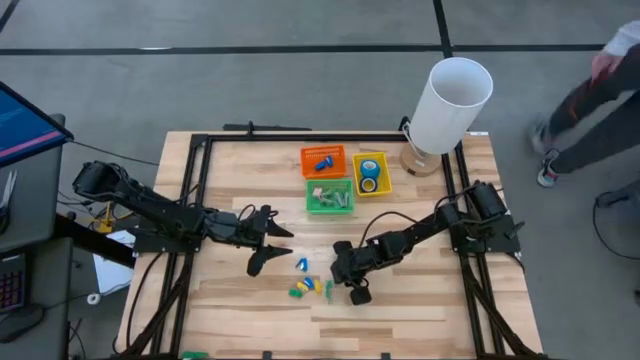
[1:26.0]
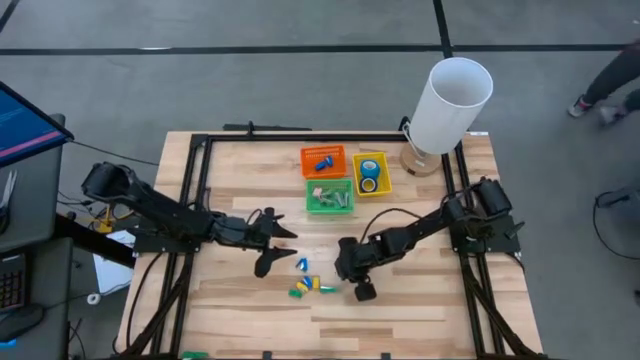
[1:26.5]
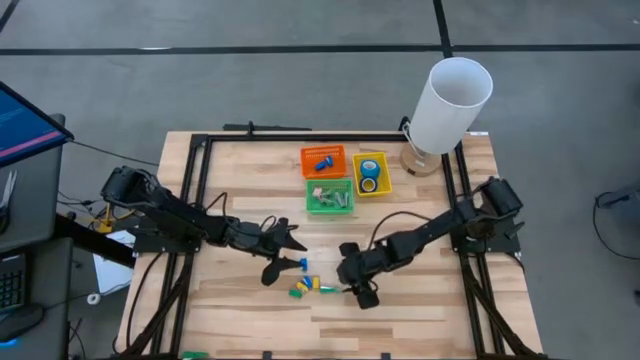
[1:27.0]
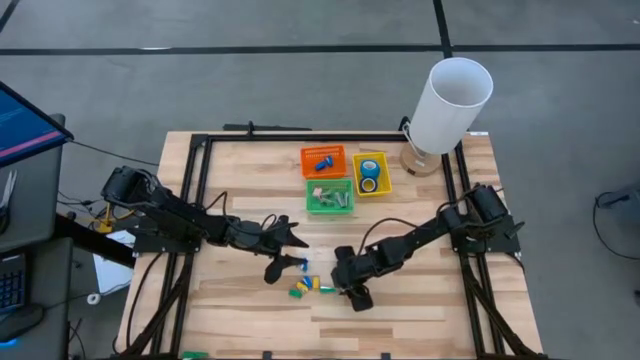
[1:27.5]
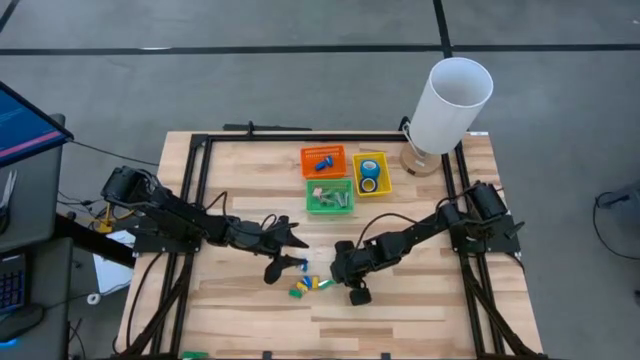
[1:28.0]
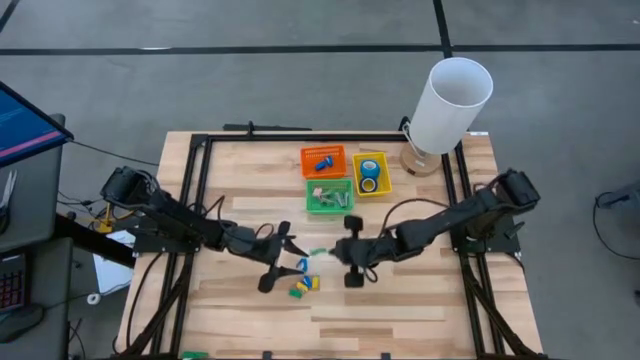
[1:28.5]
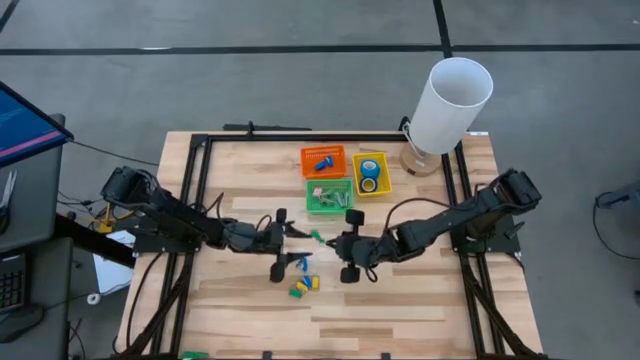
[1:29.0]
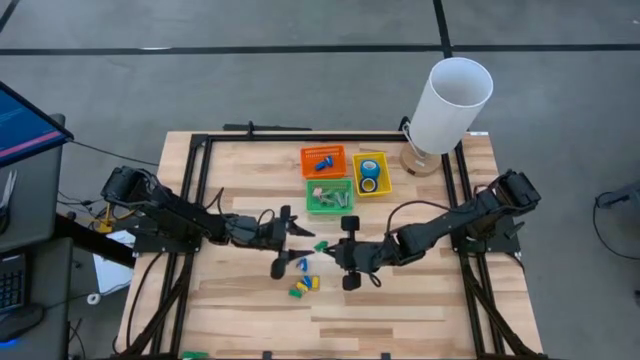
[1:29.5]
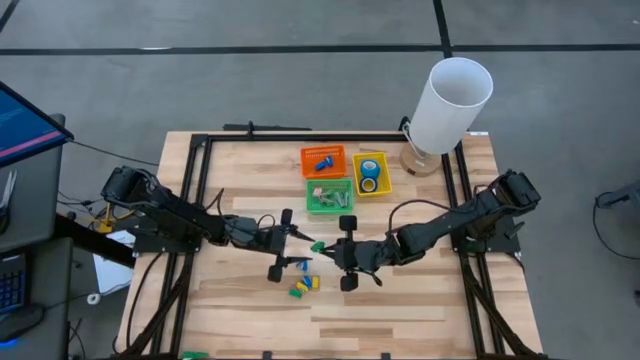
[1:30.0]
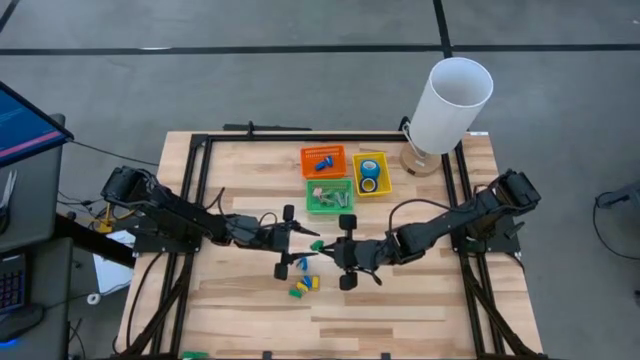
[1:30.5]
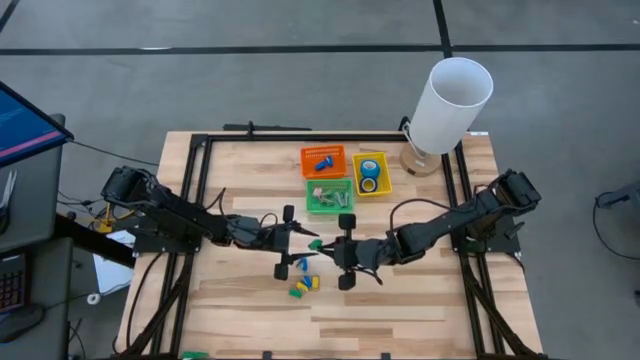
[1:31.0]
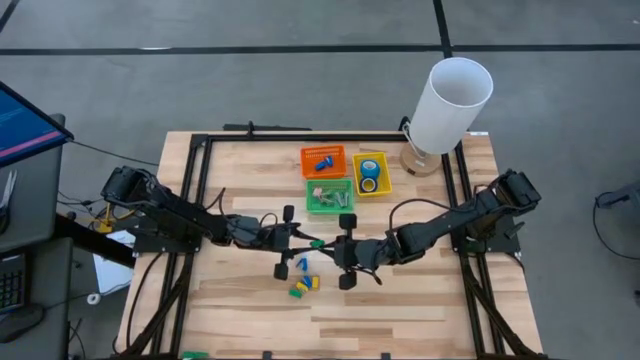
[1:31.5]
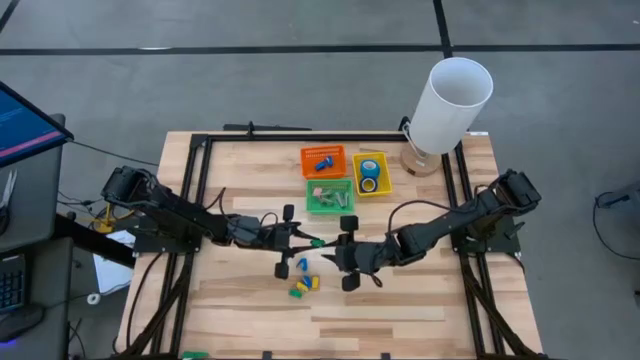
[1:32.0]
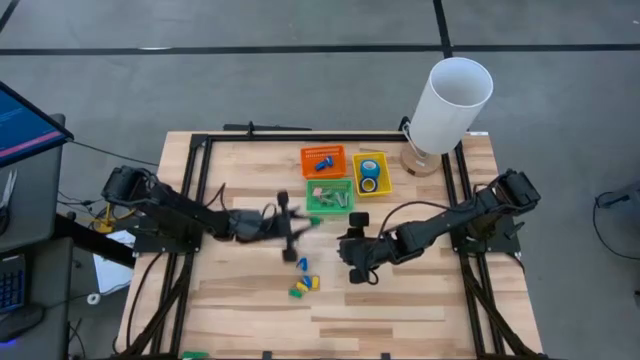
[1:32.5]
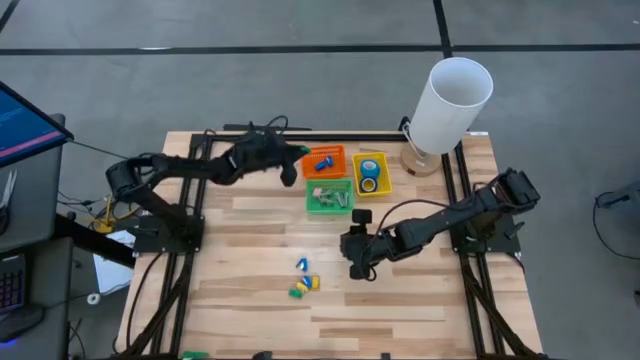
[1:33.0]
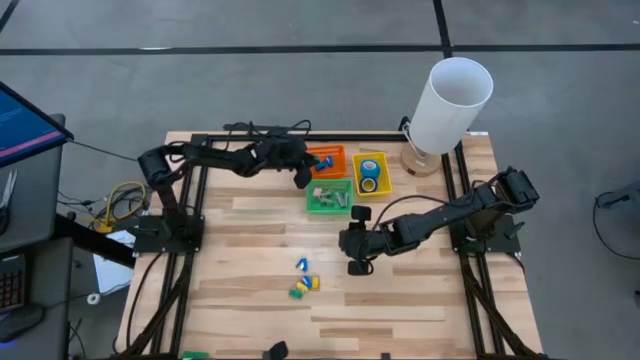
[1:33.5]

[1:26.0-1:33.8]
Task: Pick and place Stapler, Stapler remover, tape
Put the green stapler into the orange bin

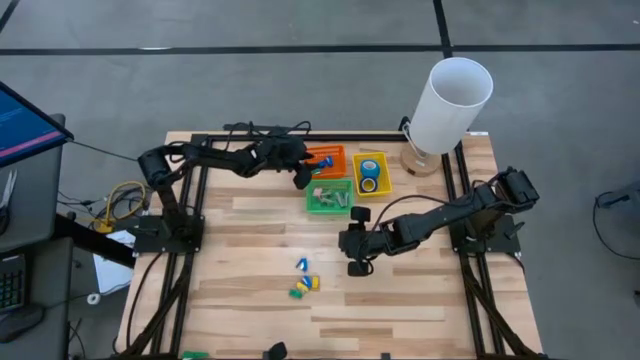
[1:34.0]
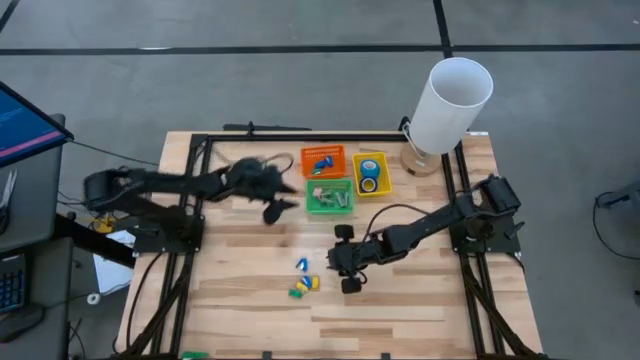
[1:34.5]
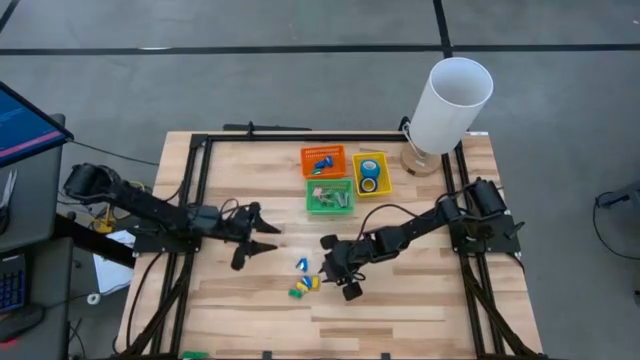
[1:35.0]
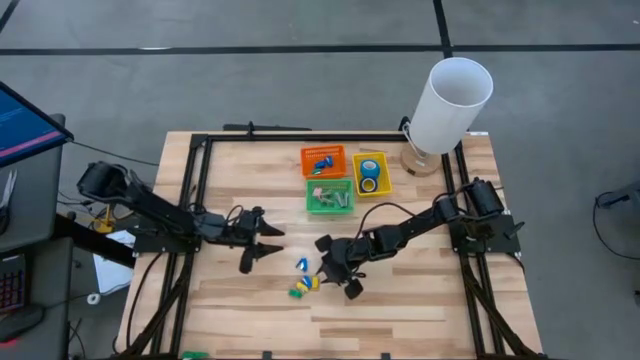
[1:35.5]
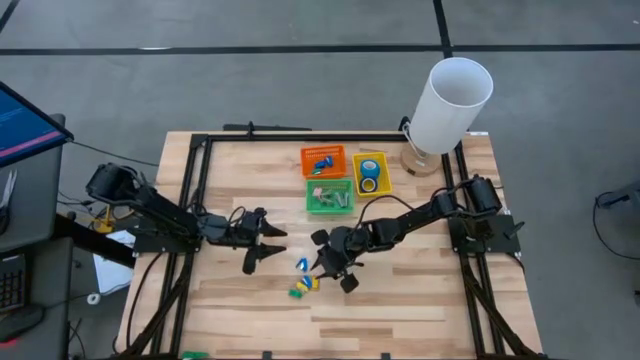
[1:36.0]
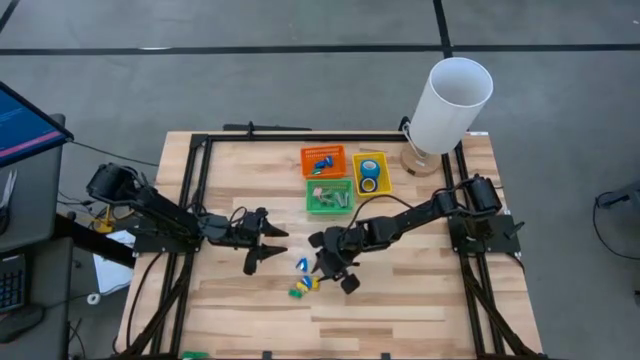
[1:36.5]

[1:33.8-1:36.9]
Put the yellow stapler into the orange bin

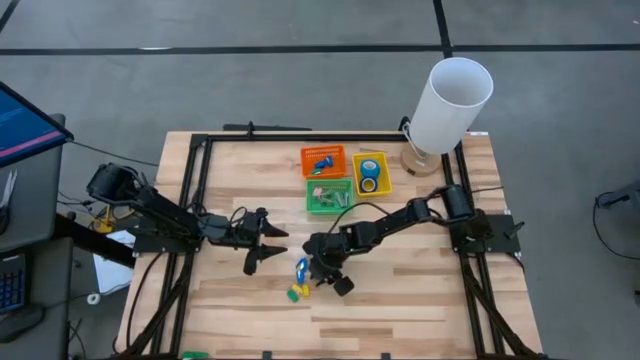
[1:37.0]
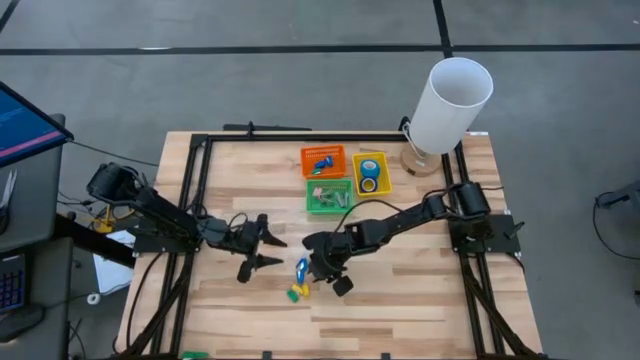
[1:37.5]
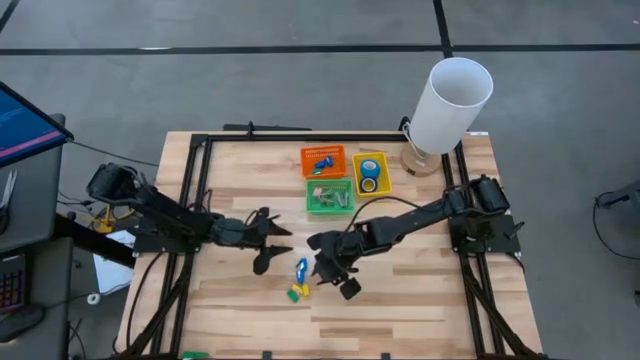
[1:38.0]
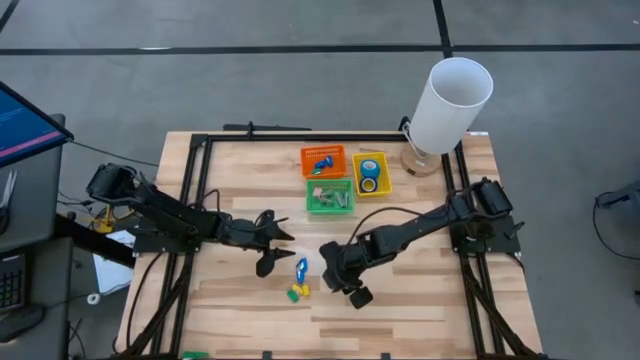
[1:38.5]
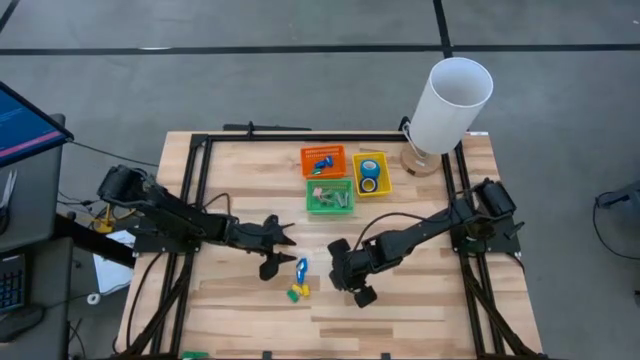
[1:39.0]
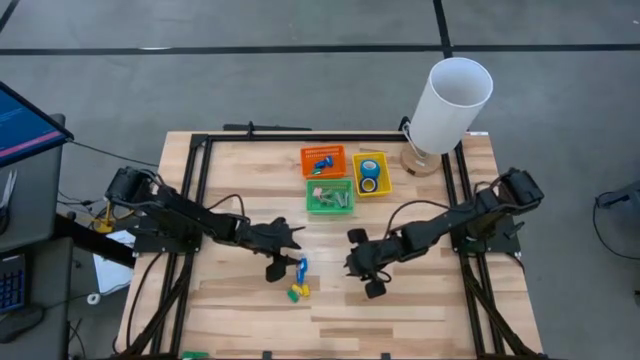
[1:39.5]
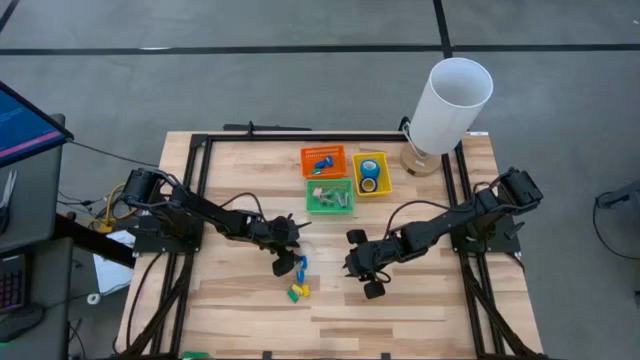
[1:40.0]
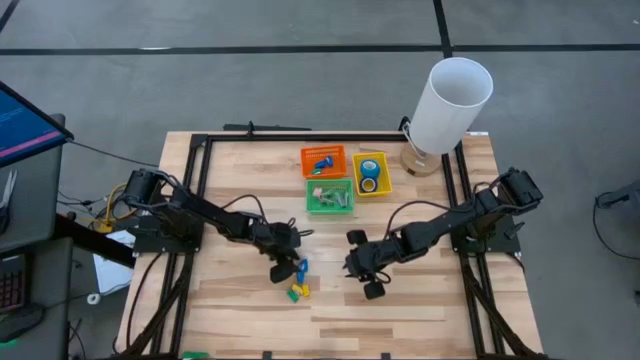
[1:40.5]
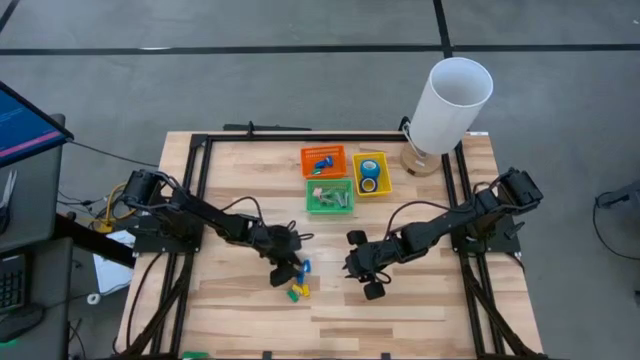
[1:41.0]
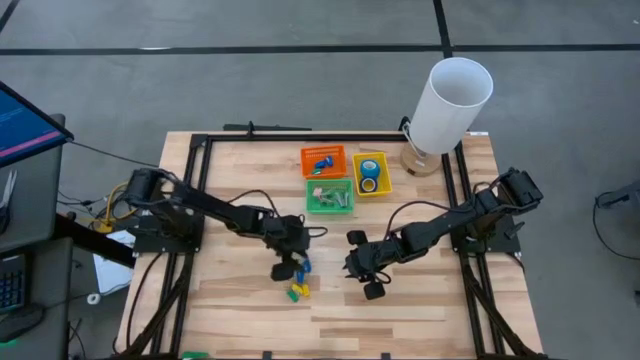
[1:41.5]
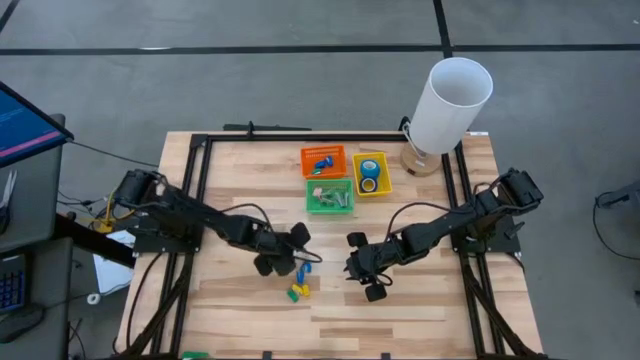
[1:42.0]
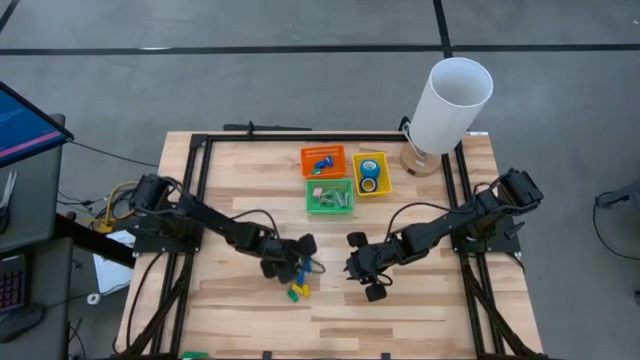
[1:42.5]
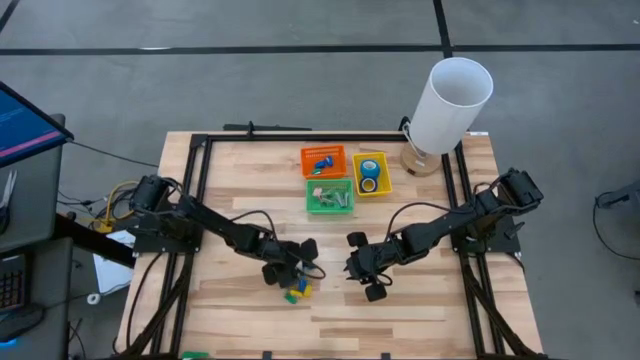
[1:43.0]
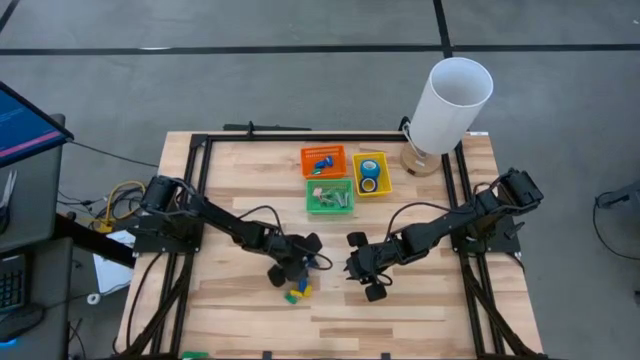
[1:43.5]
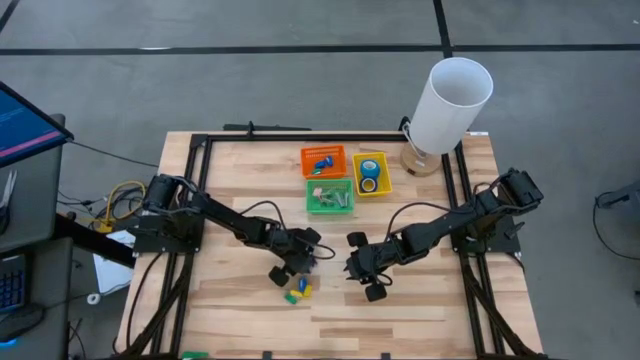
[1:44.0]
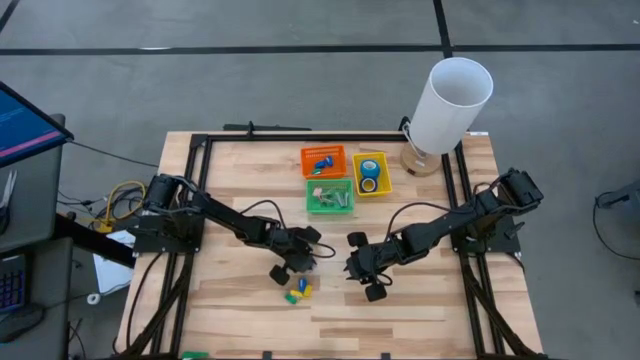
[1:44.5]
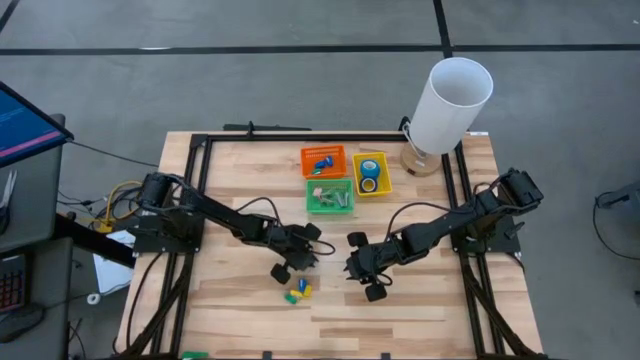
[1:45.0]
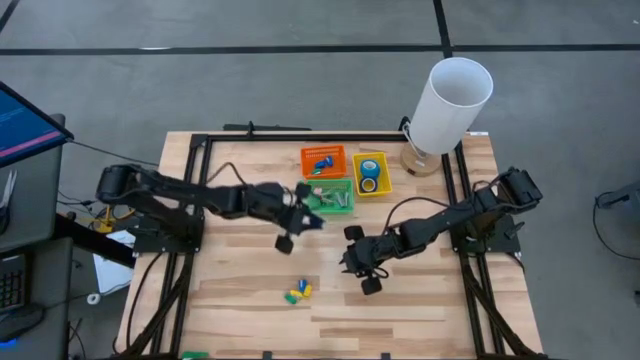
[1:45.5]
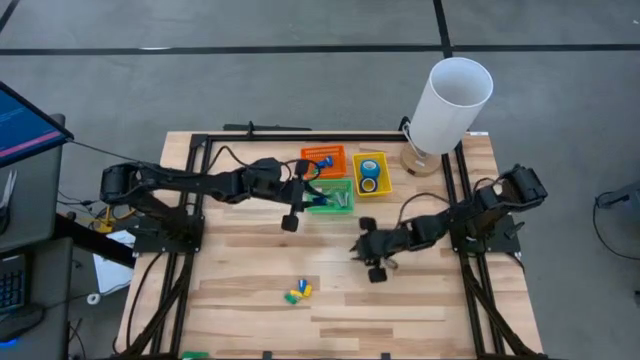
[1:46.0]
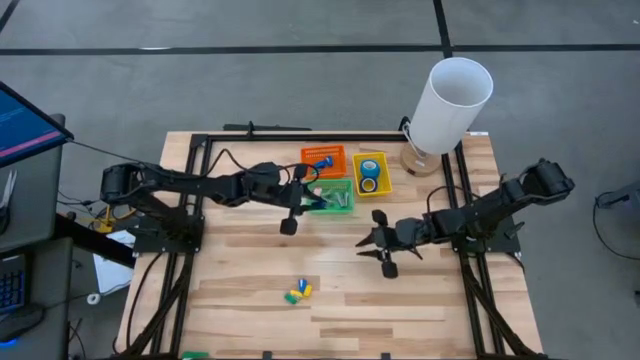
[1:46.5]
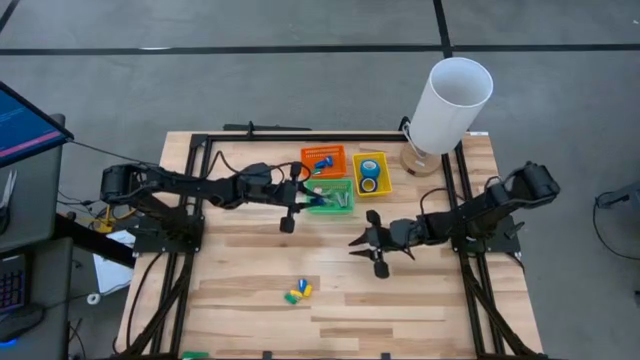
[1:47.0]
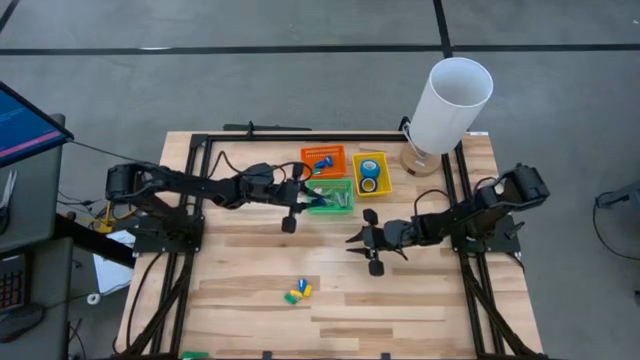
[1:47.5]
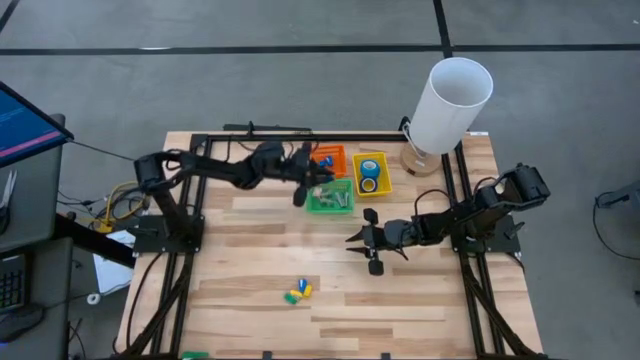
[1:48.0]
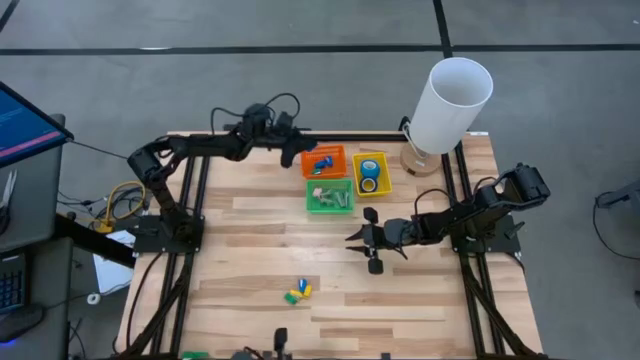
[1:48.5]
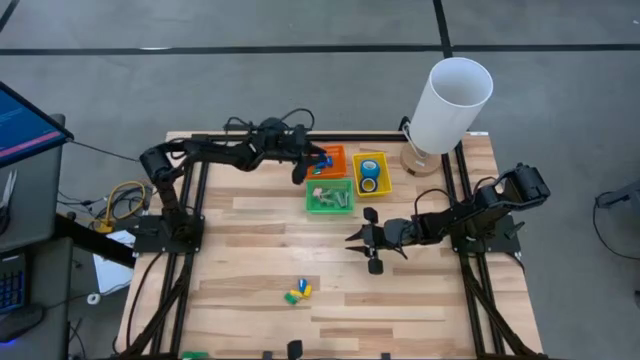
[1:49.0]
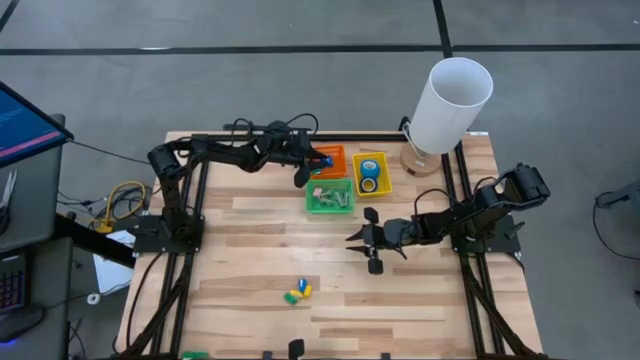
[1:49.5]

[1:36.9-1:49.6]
Put the blue stapler into the orange bin
